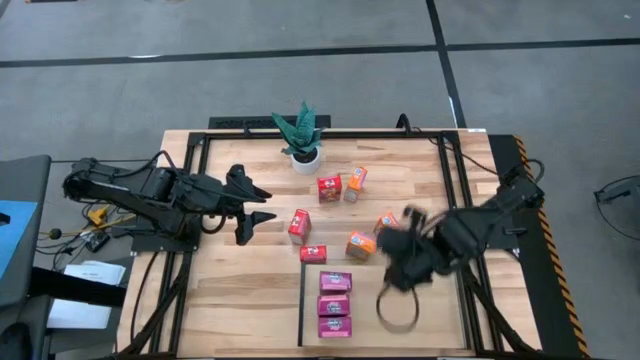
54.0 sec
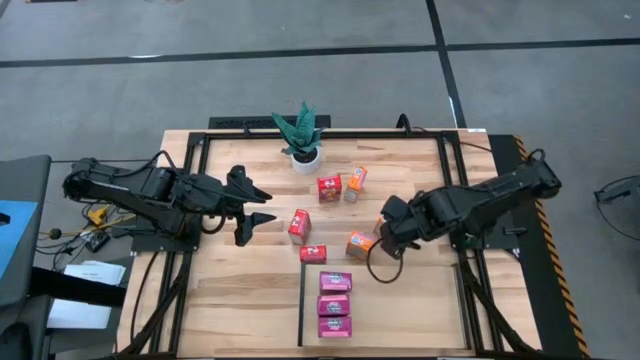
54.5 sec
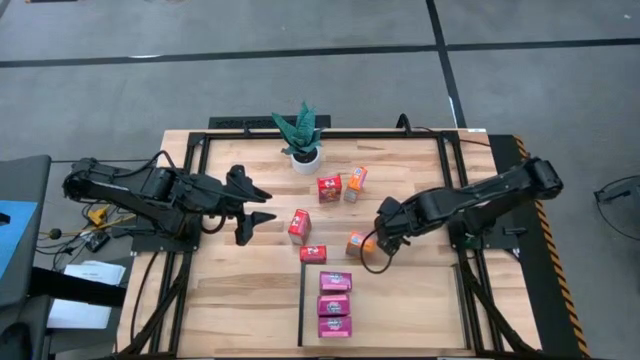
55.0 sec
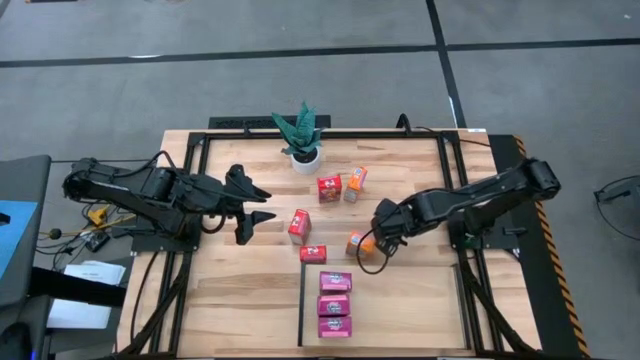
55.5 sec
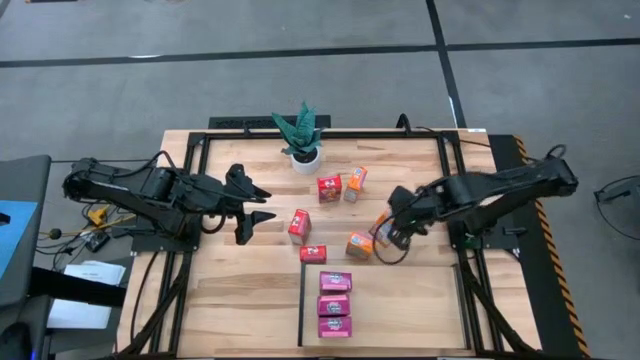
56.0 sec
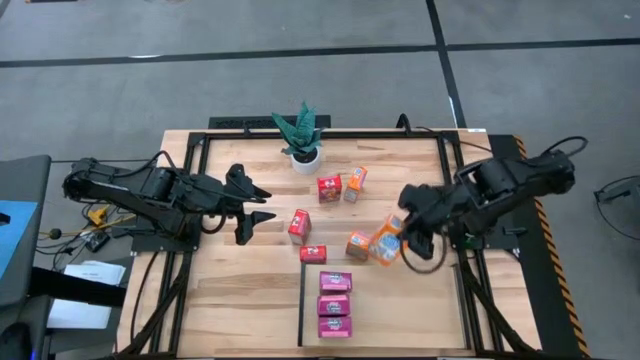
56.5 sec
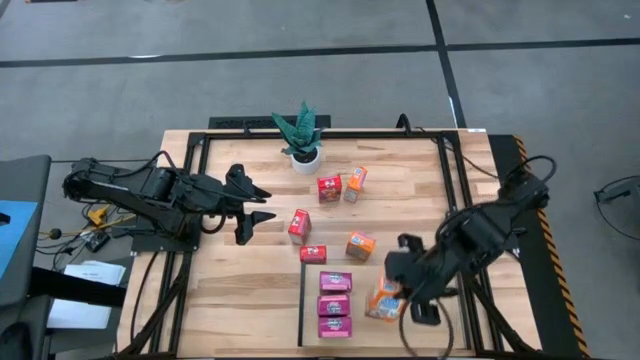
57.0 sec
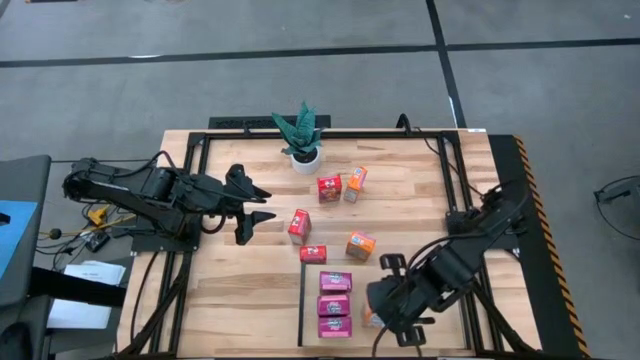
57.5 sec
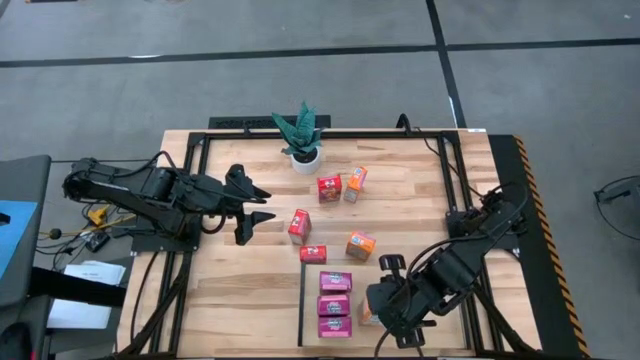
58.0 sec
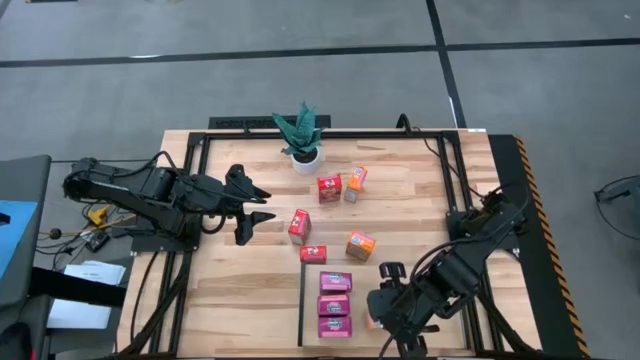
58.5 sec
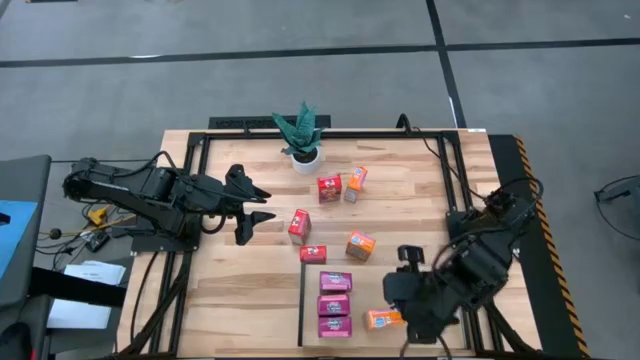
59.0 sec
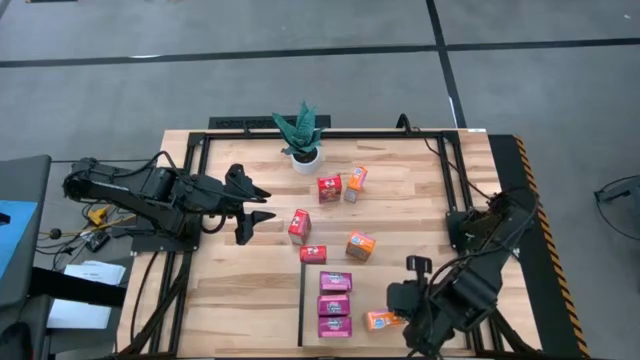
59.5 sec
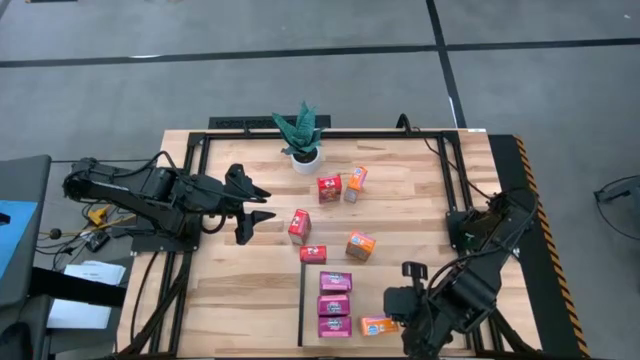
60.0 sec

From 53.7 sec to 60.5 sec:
Task: Stack cereal on shelf
Put the orange cereal box on the bottom mid shelf

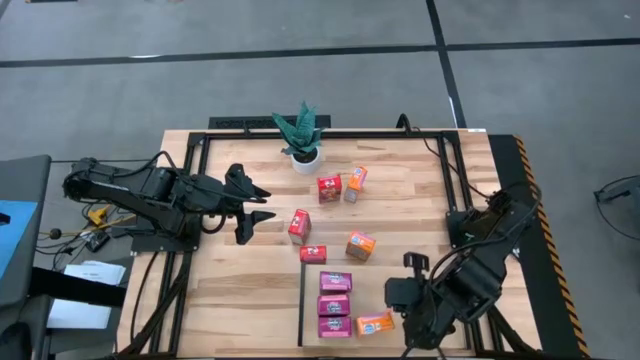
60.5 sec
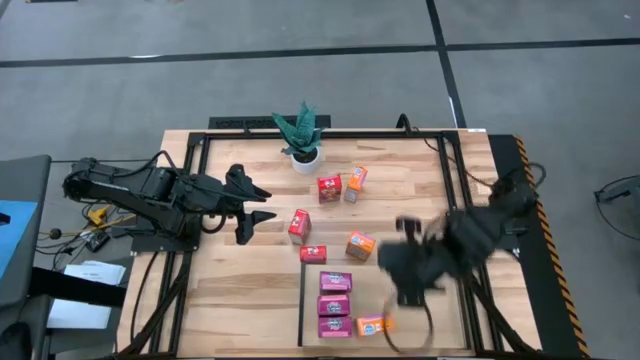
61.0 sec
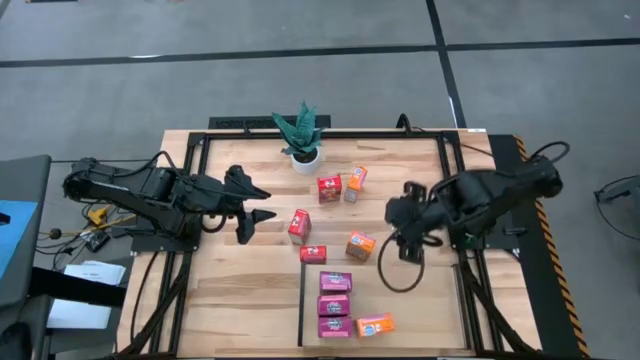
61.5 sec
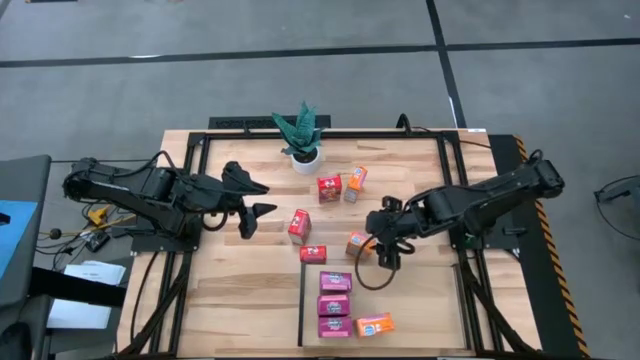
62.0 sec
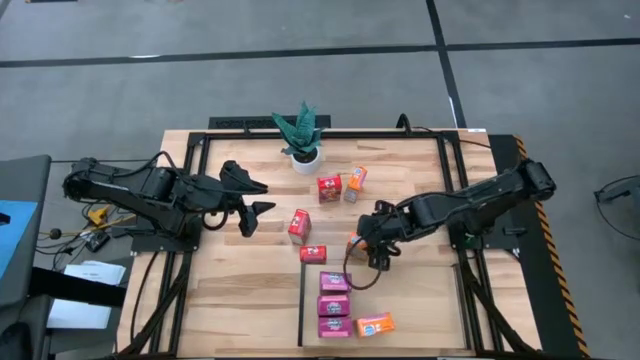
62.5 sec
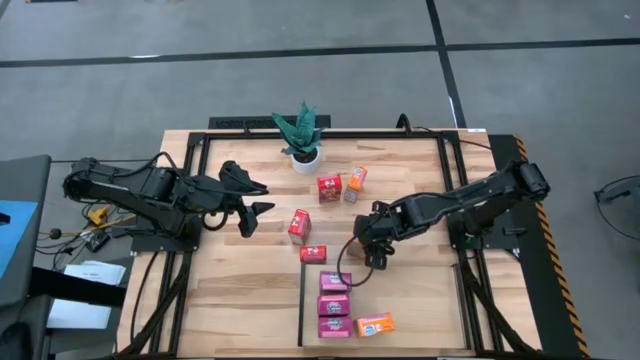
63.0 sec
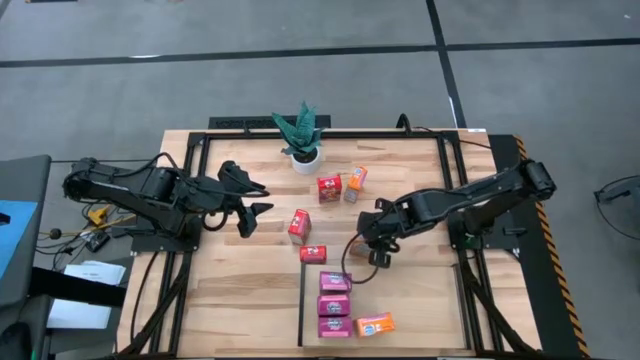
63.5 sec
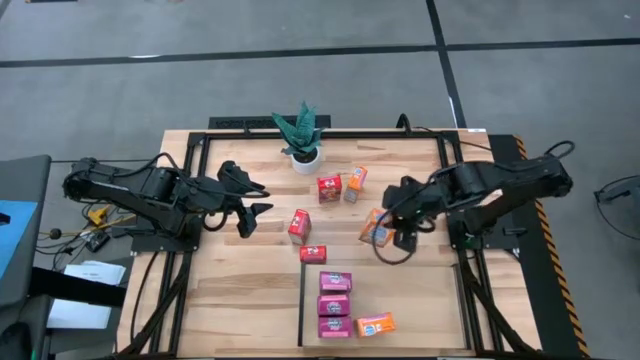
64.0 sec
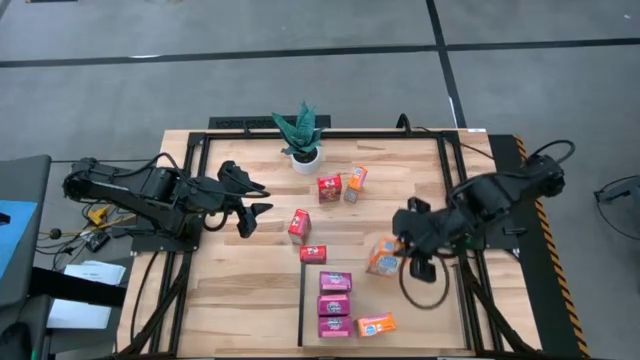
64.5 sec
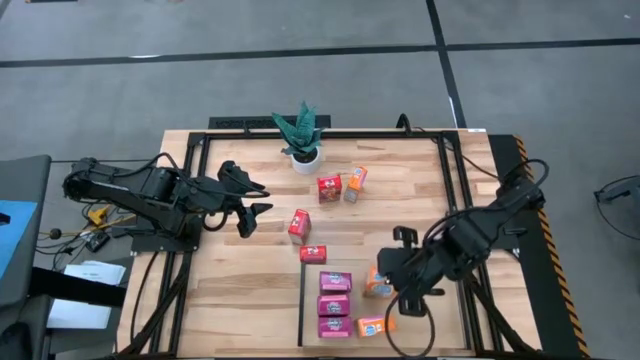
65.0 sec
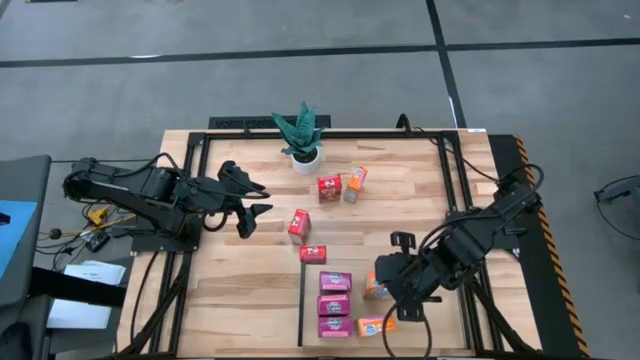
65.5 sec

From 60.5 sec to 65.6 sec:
Put the orange cereal box on the table

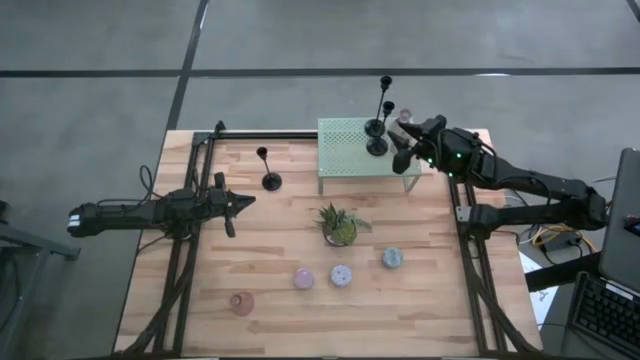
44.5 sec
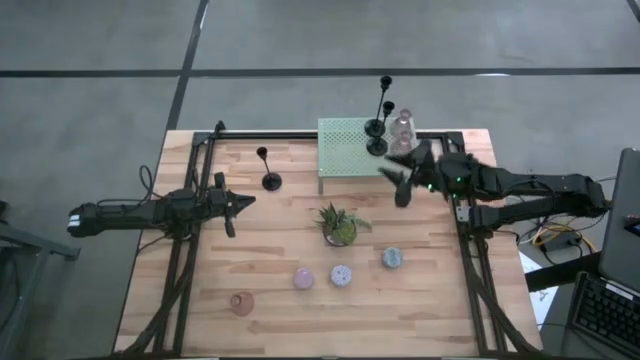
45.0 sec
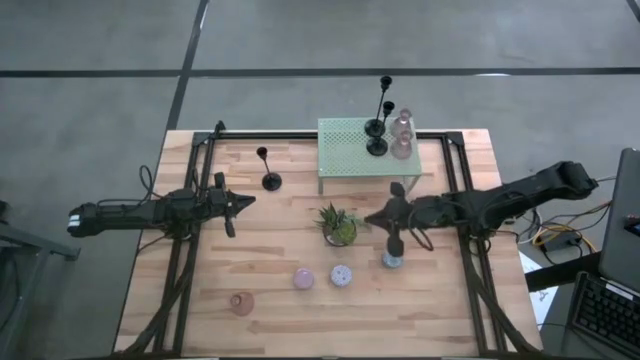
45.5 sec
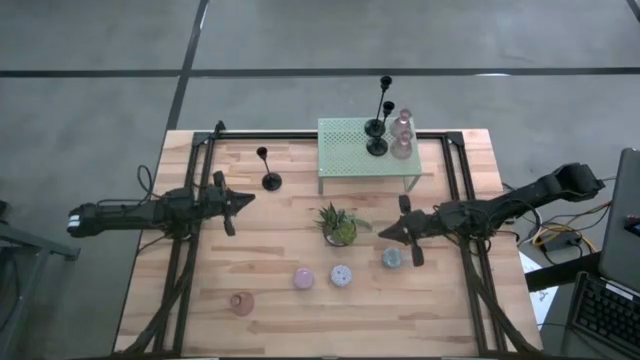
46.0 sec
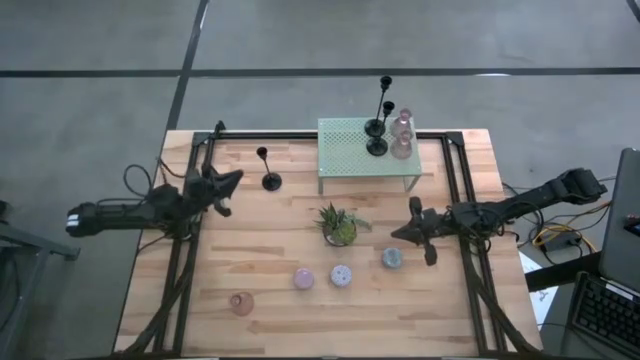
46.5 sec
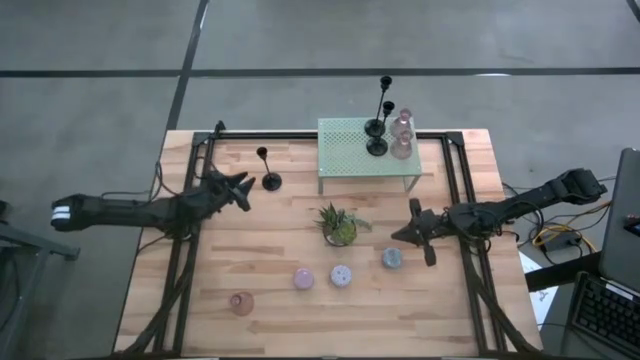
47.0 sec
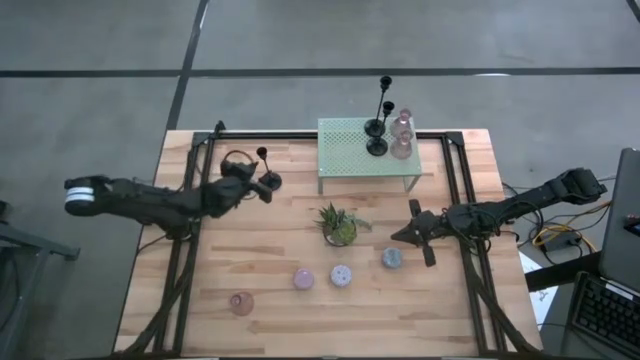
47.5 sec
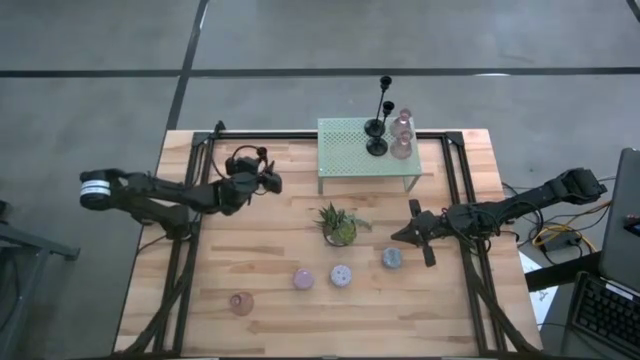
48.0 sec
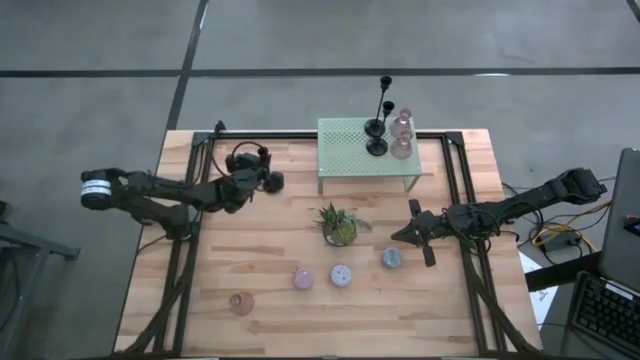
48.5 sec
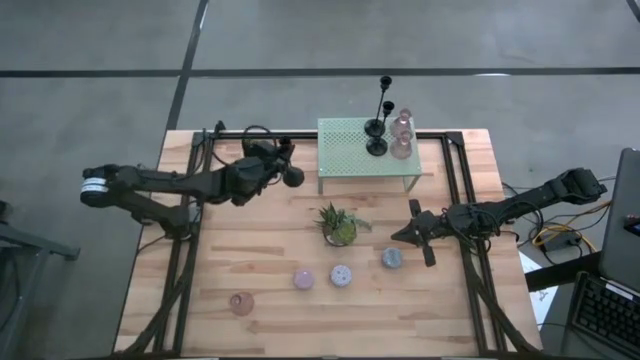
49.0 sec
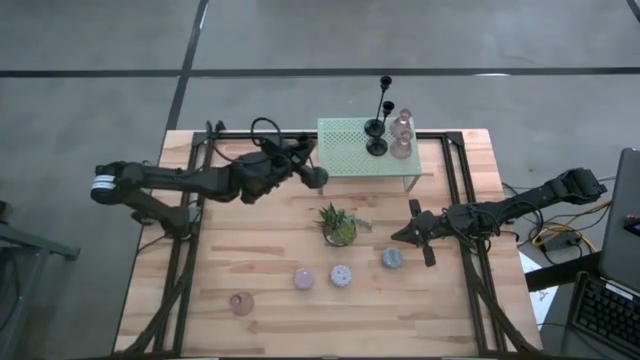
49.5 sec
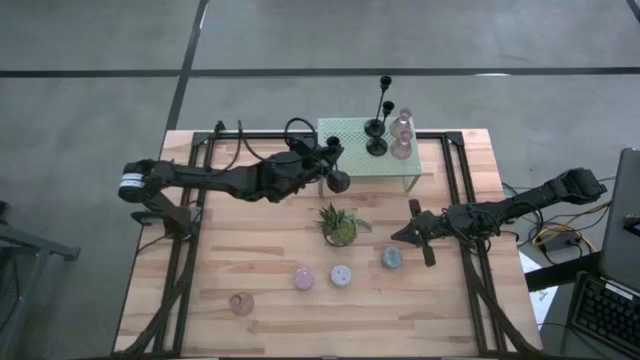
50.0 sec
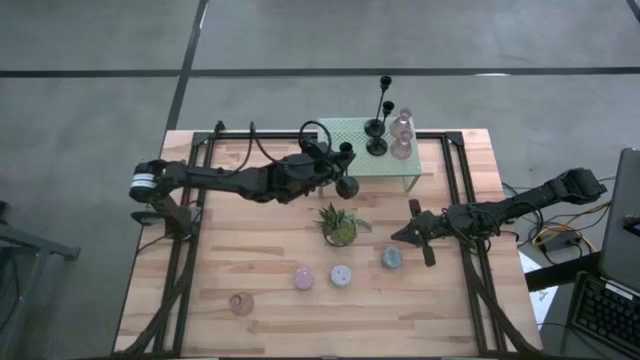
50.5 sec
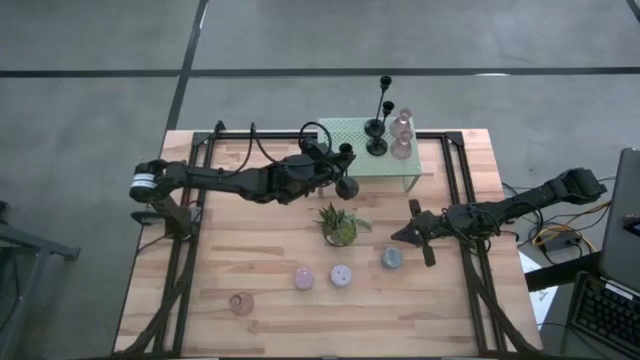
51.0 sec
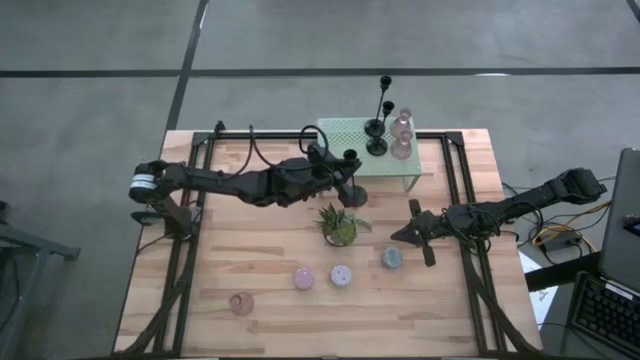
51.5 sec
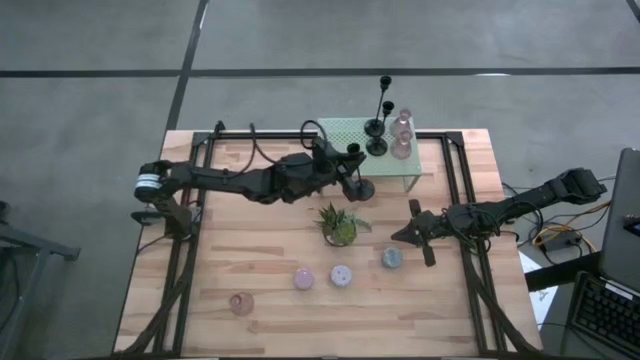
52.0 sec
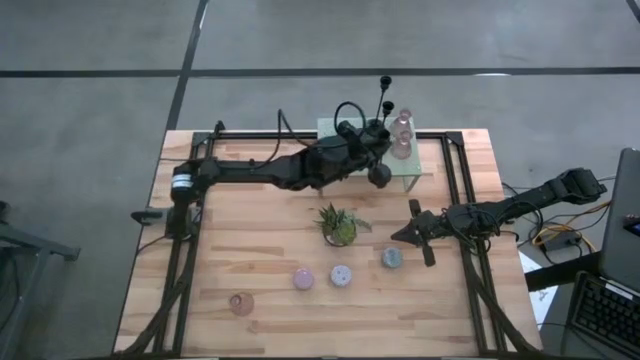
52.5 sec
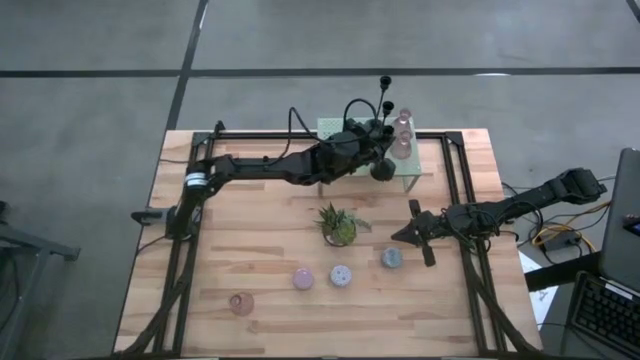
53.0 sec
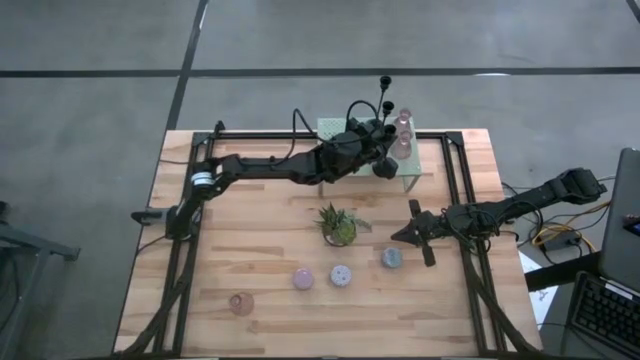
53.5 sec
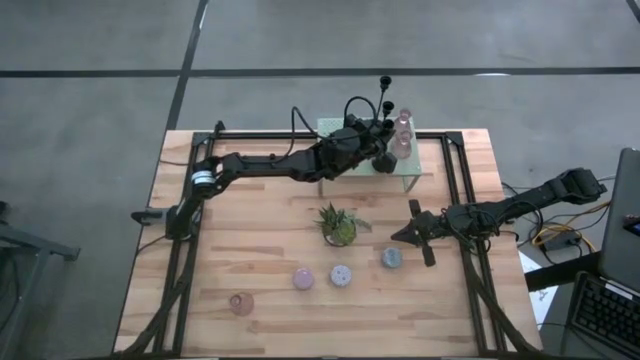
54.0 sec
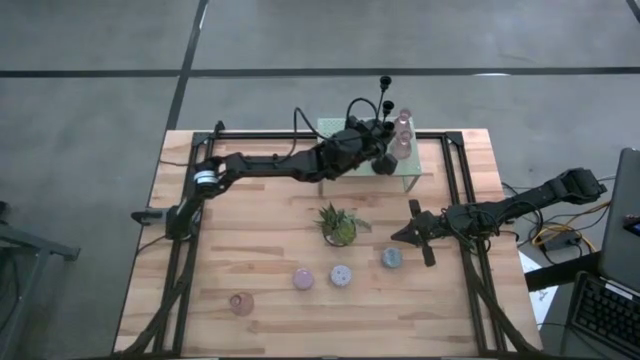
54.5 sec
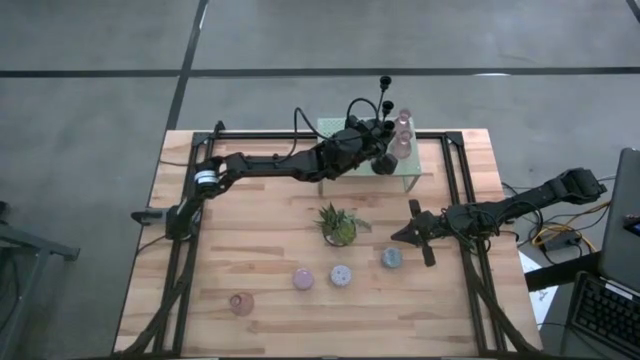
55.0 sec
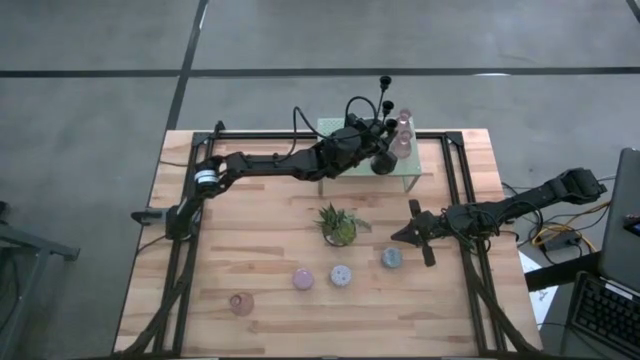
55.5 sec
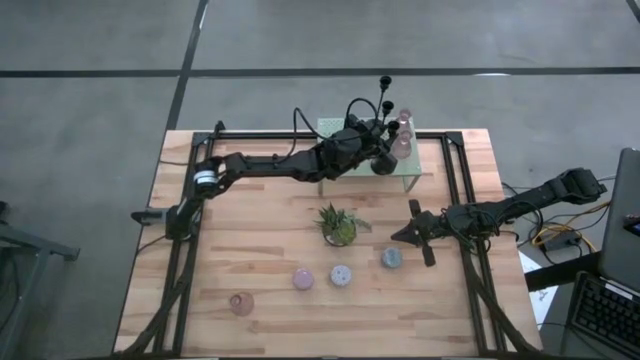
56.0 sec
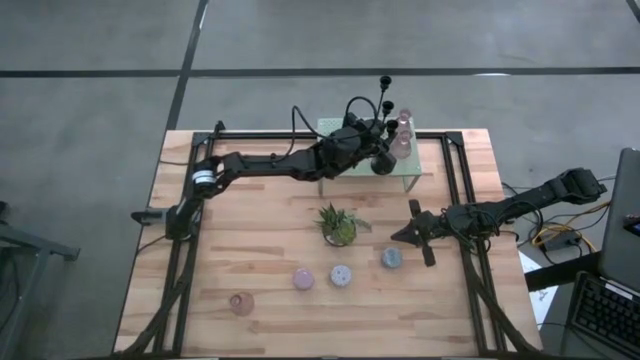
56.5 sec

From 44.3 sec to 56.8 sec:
Task: Pick & Place candle stick holders
Put the black candle holder on the shelf
